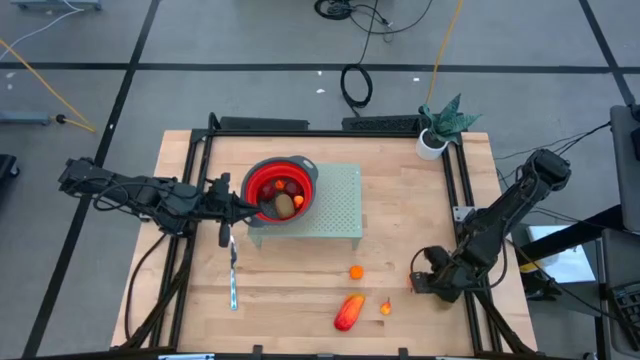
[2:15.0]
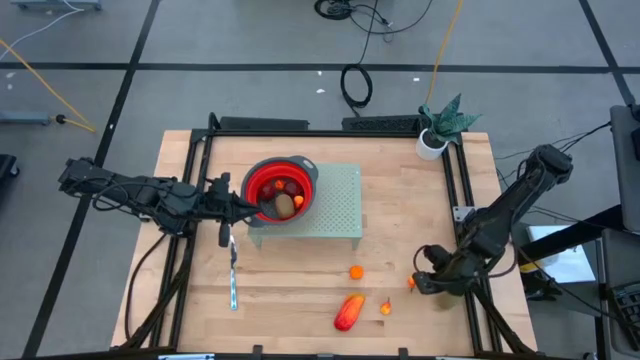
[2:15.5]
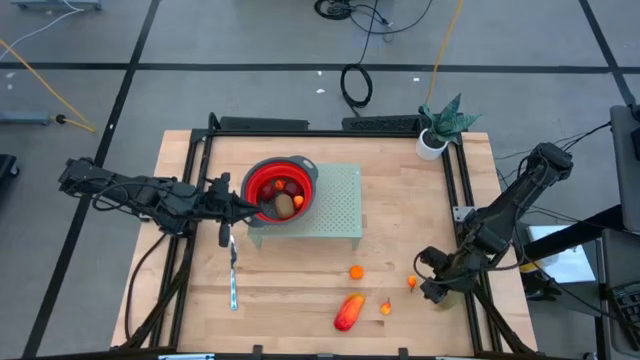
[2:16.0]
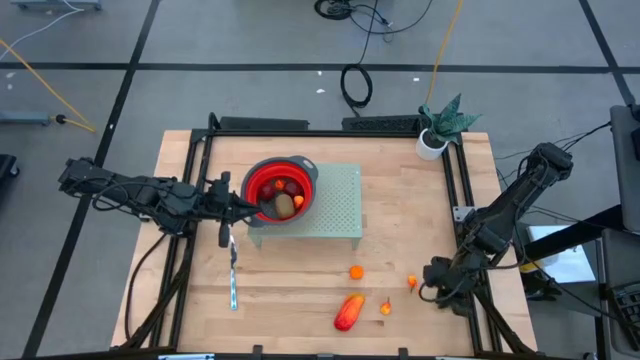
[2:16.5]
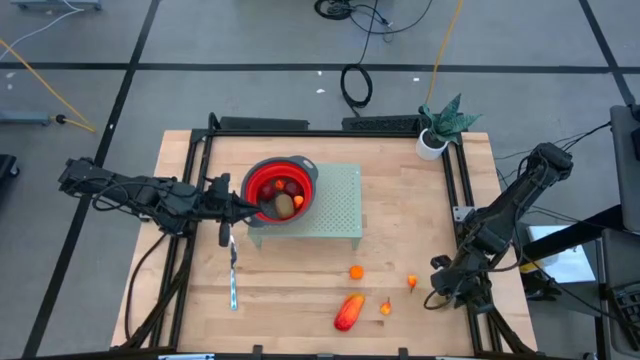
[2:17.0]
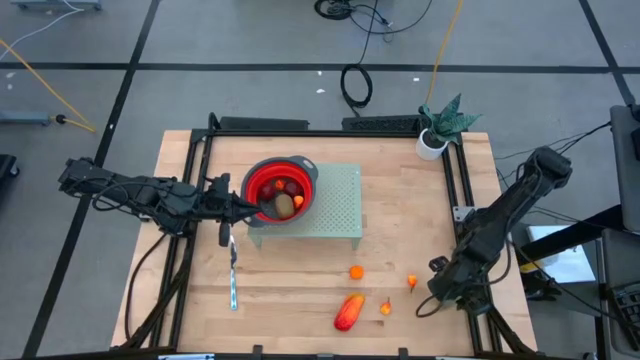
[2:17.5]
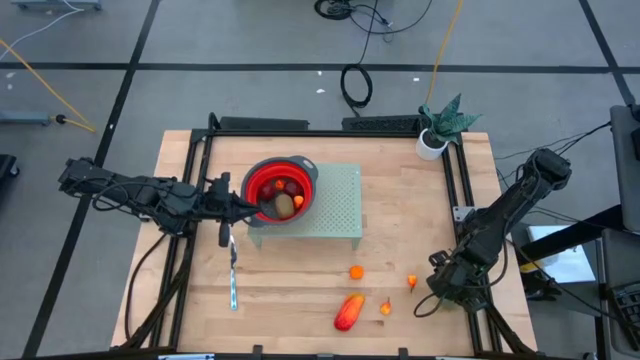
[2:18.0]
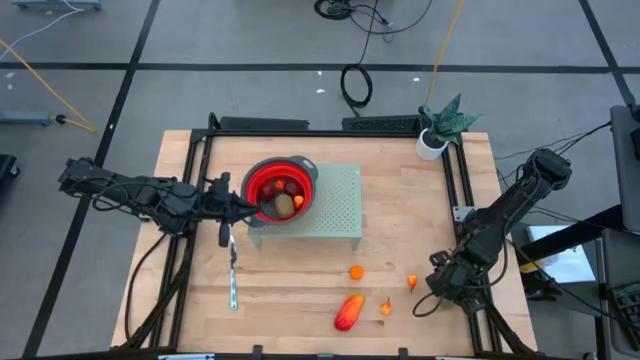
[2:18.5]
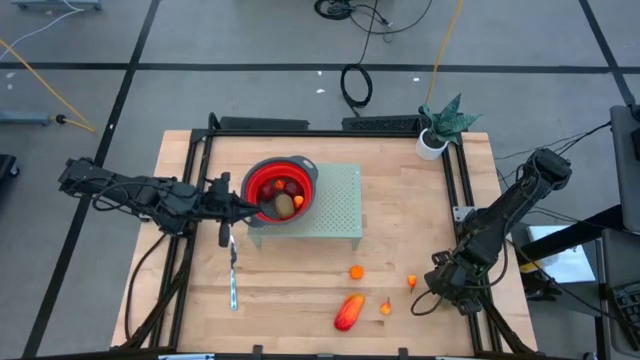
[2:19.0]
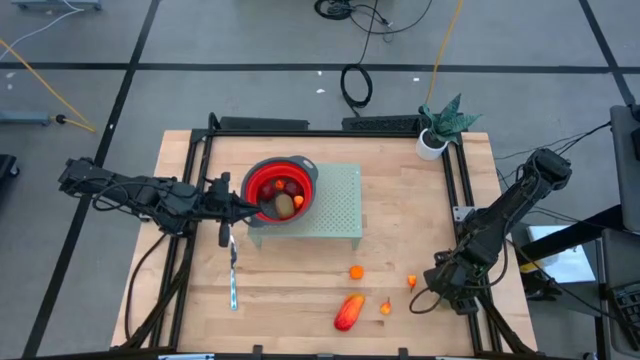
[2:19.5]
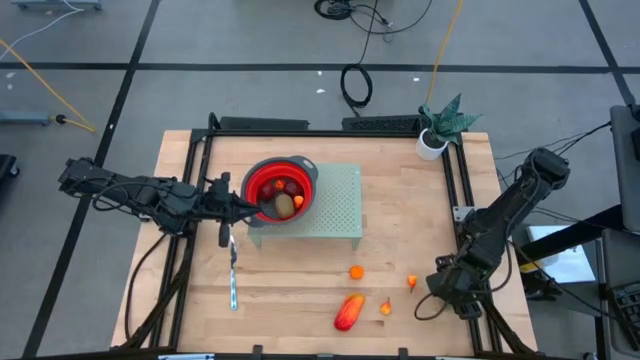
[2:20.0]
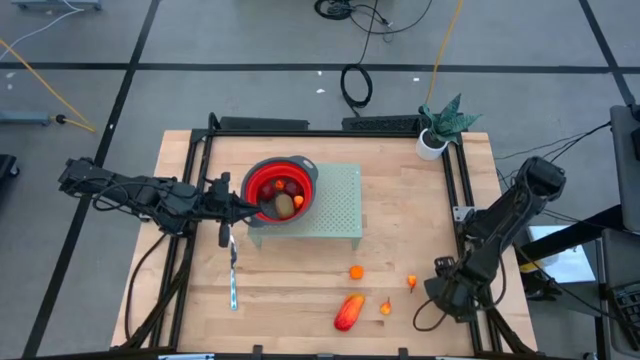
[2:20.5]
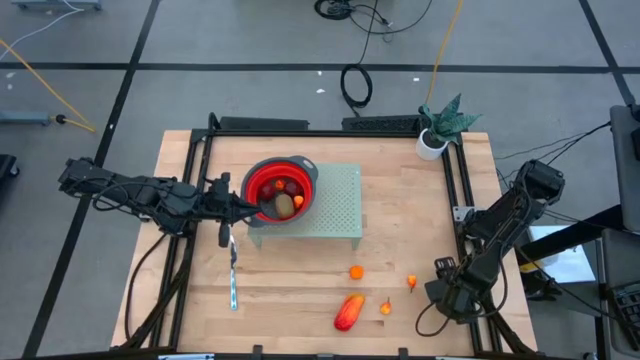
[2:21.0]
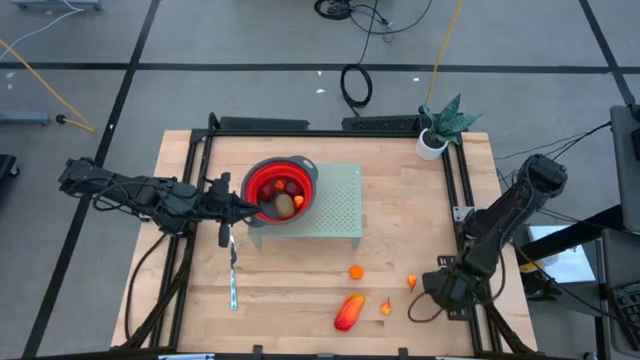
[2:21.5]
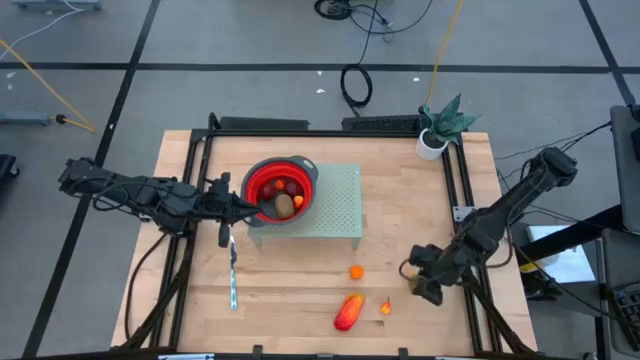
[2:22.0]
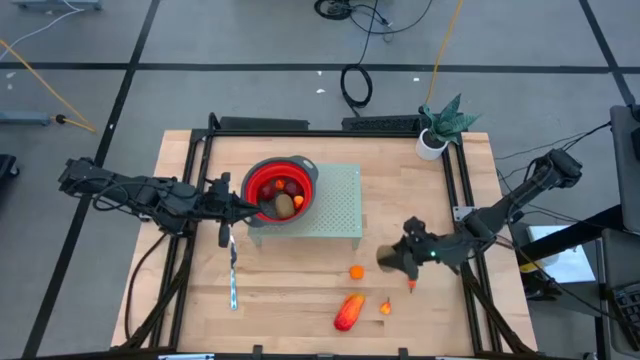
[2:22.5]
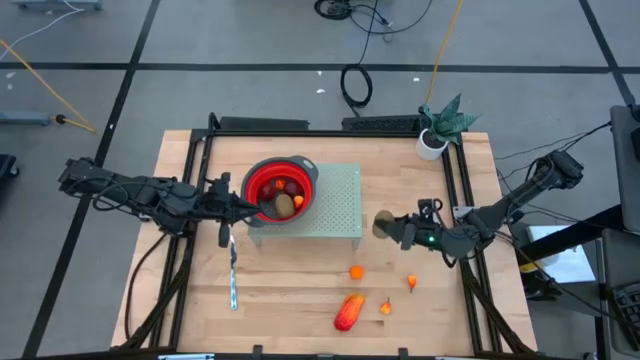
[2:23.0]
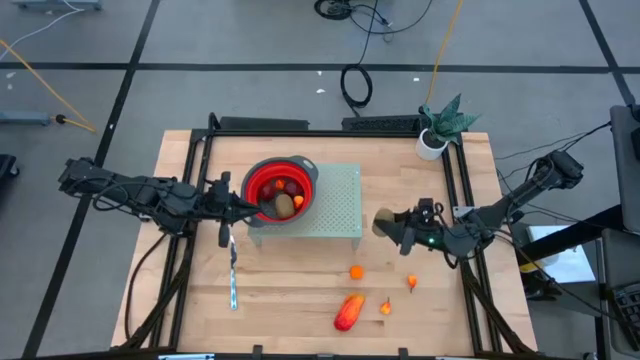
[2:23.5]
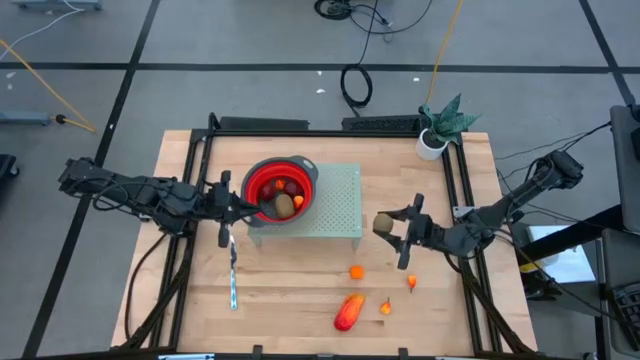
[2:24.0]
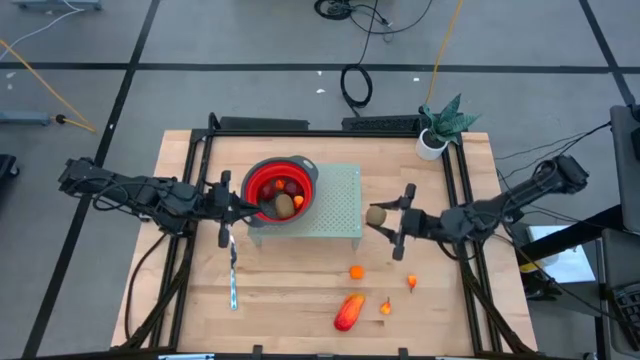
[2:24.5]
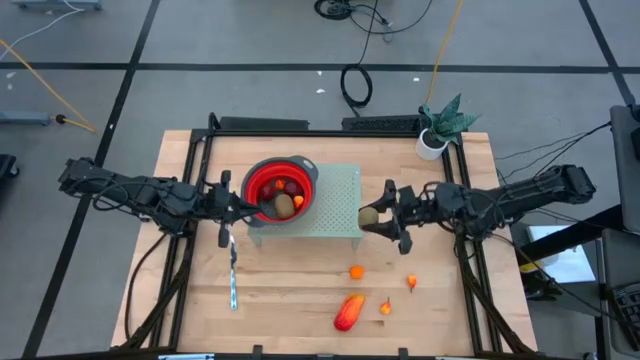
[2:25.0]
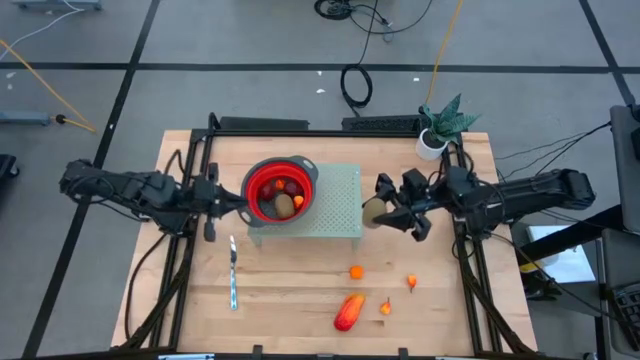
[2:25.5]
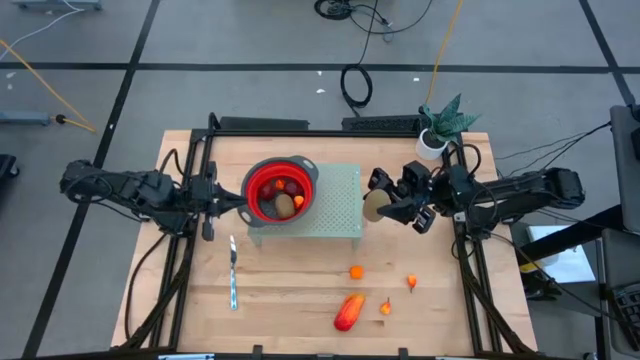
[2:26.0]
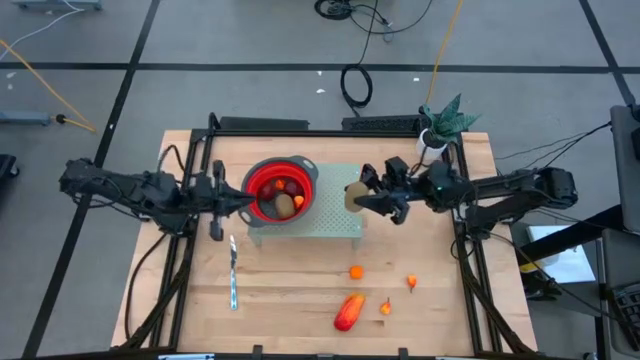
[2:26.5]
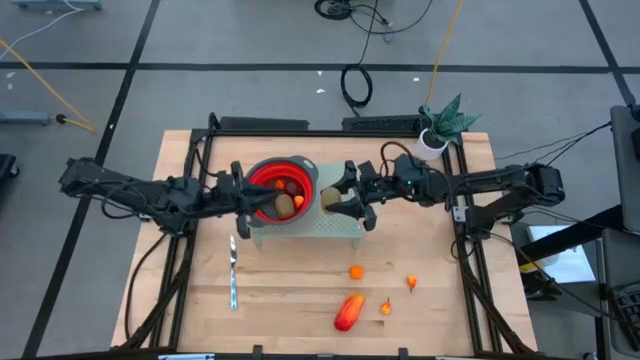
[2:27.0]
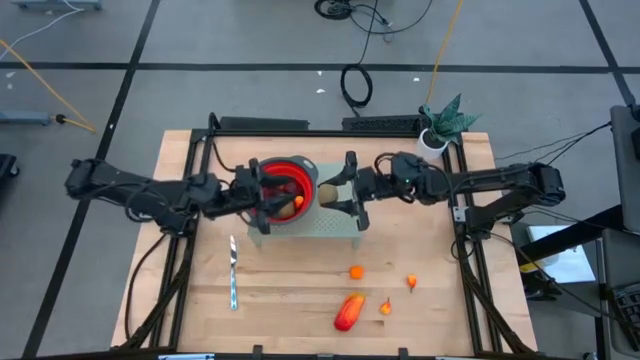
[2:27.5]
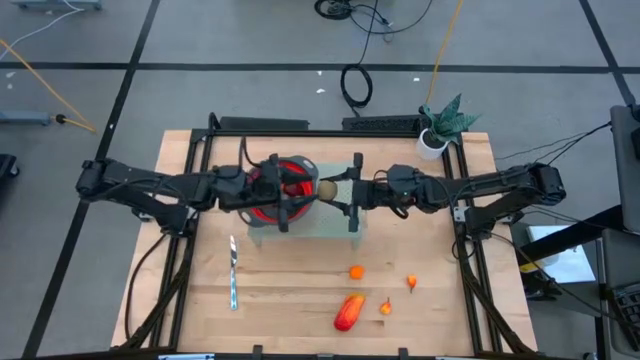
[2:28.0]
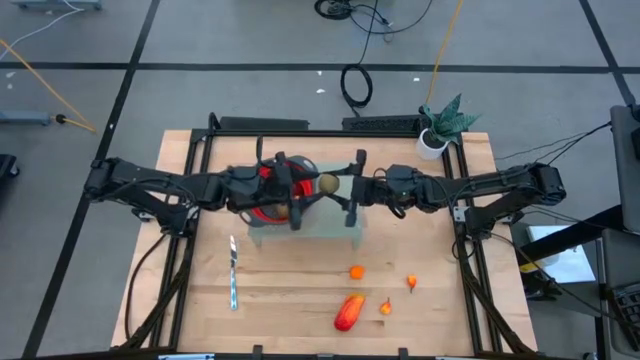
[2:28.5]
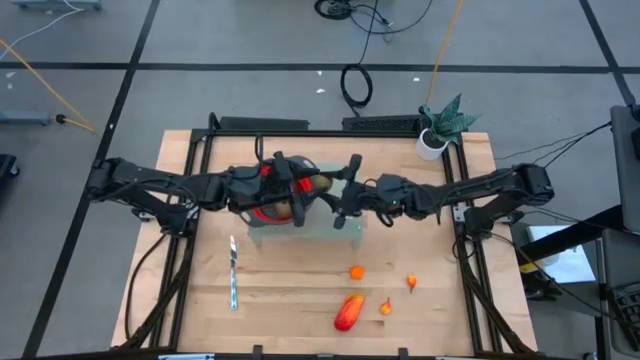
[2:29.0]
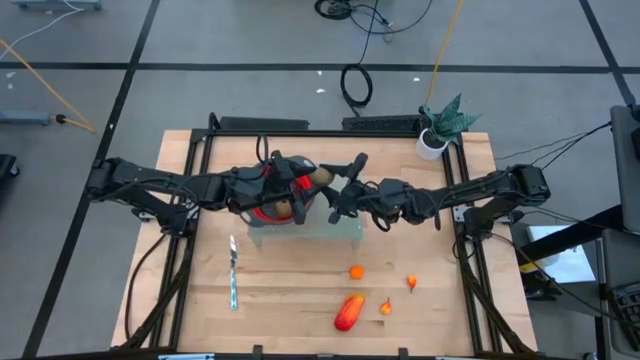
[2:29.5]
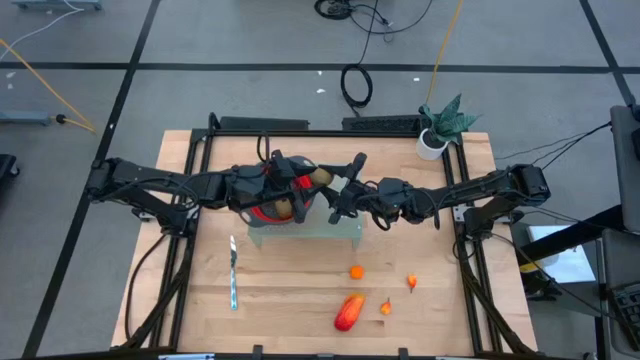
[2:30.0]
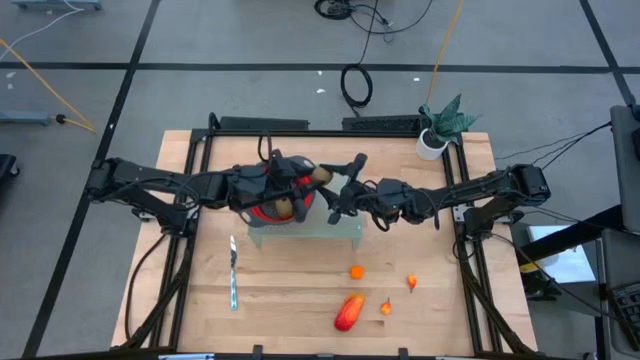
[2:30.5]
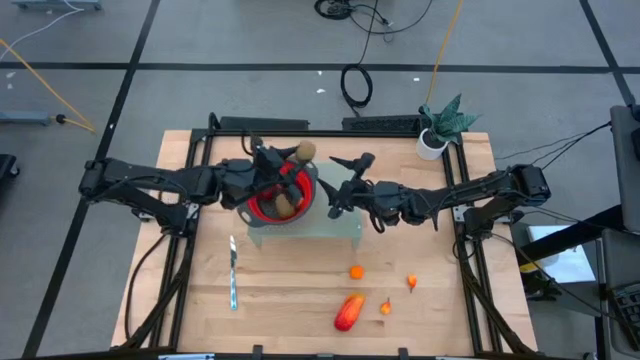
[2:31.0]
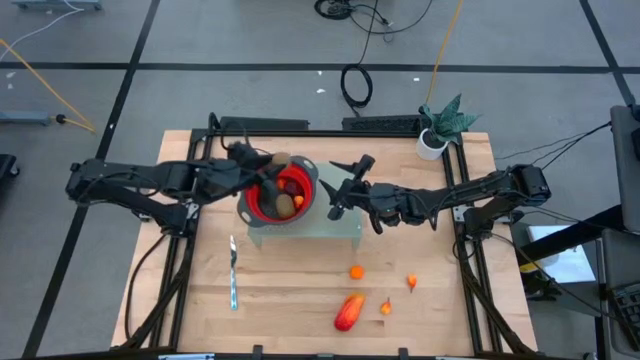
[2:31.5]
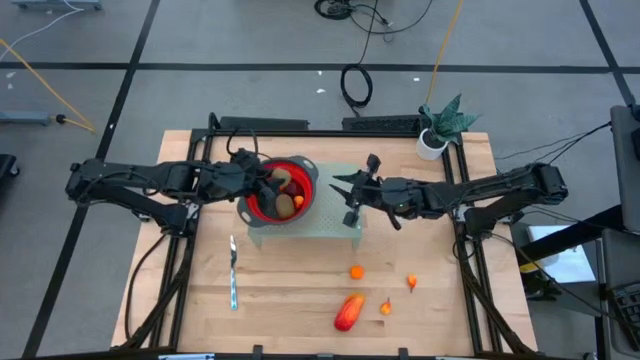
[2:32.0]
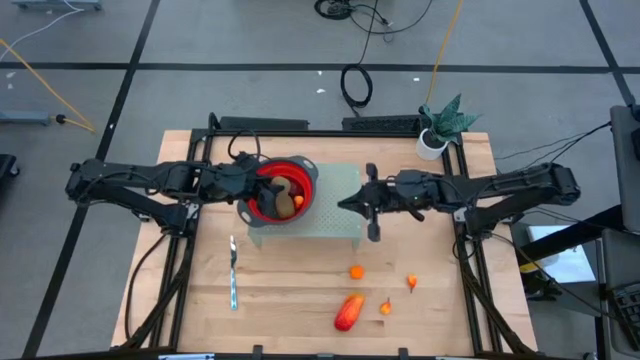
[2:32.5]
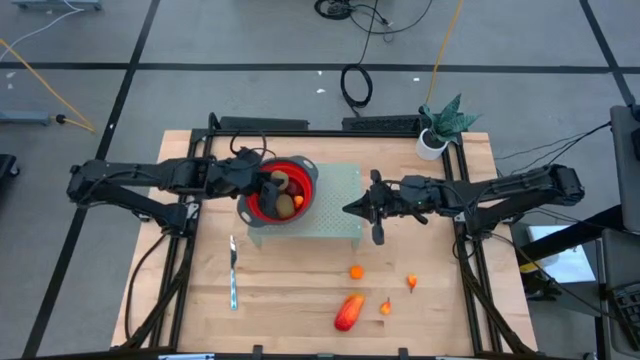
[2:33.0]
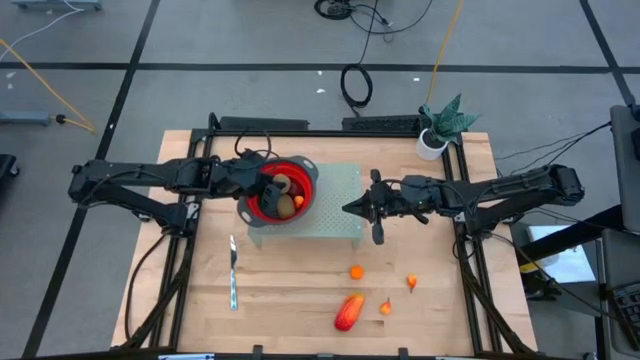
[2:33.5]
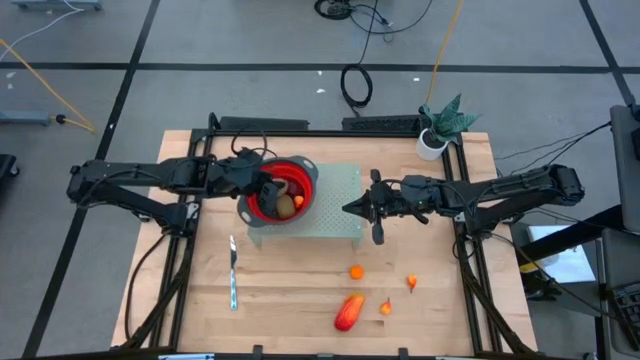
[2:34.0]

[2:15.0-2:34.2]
Task: Pick & Place Fruit
Put the kiwi into the strainer bowl on the shelf

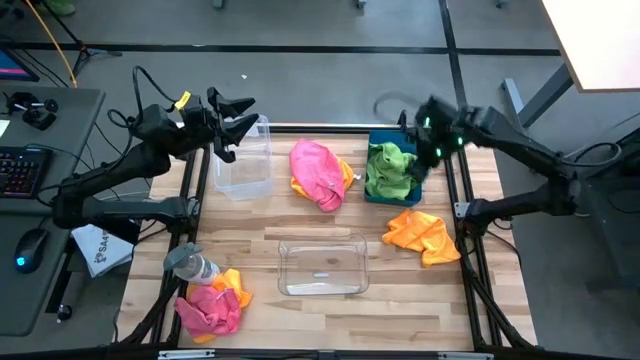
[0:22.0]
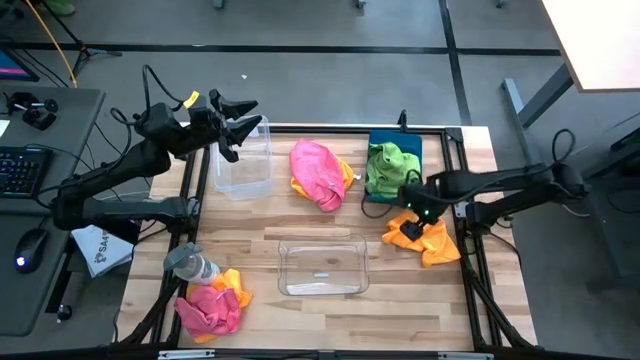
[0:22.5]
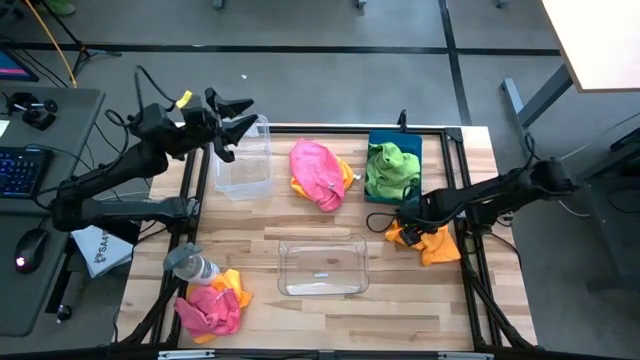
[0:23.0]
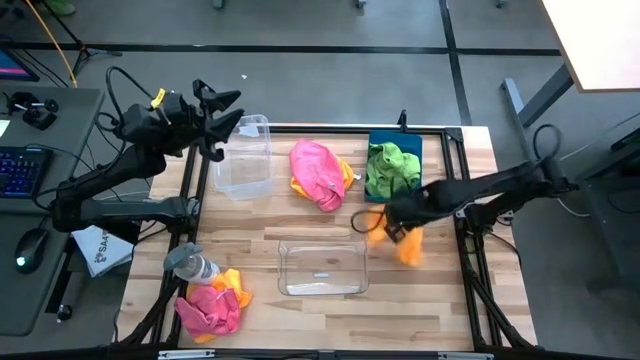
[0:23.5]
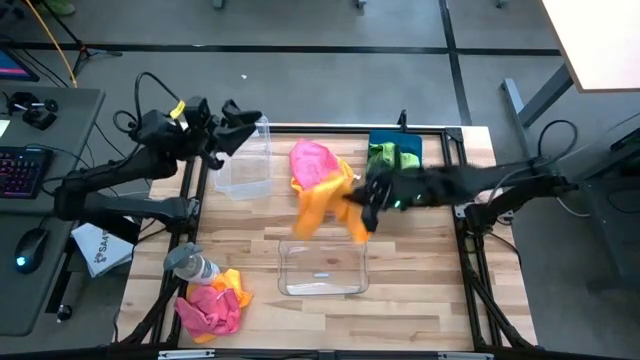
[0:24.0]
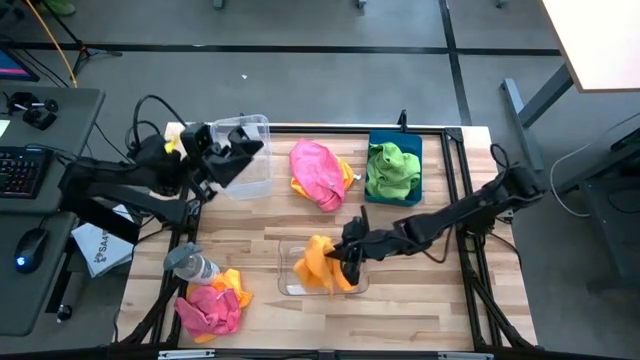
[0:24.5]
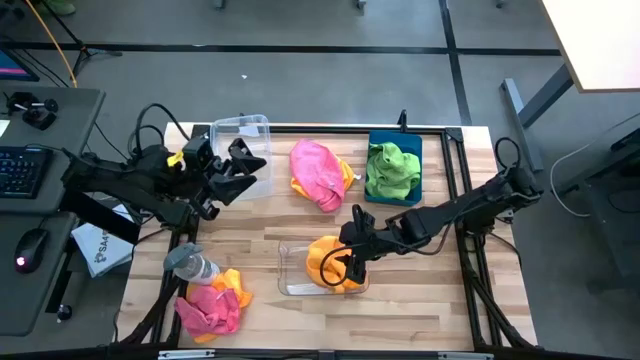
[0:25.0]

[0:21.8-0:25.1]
Task: Sort microfiber towel by color & place in baskets
Put the middle right yellow microfiber towel into the bottom transparent bin
